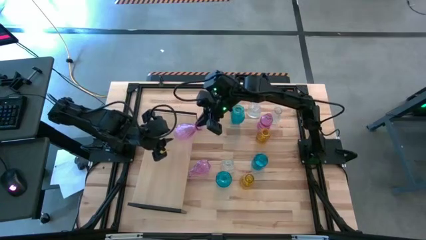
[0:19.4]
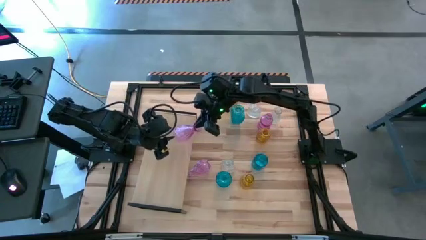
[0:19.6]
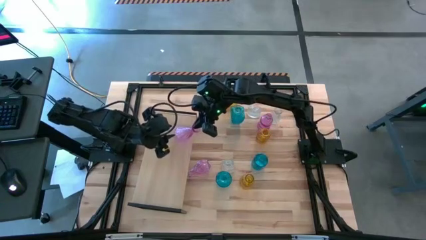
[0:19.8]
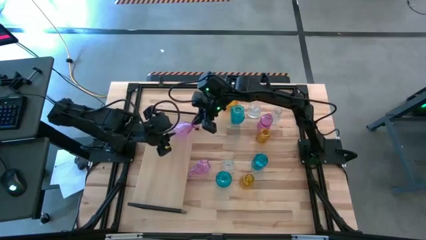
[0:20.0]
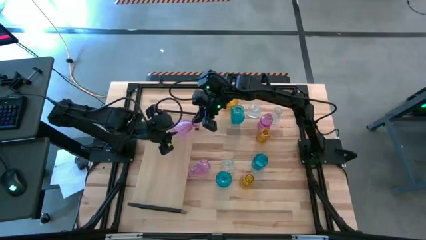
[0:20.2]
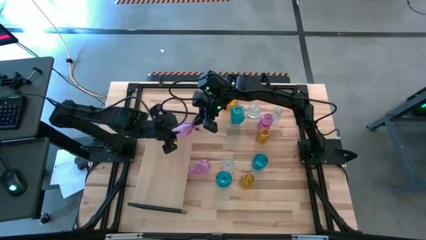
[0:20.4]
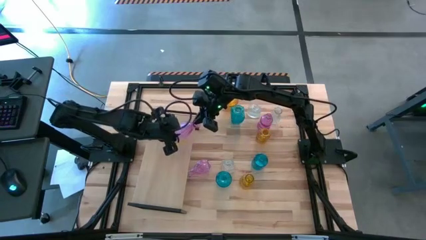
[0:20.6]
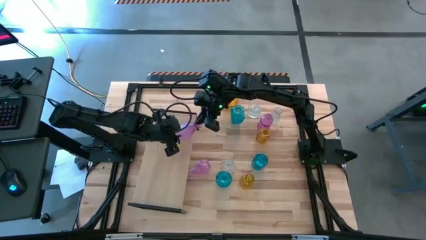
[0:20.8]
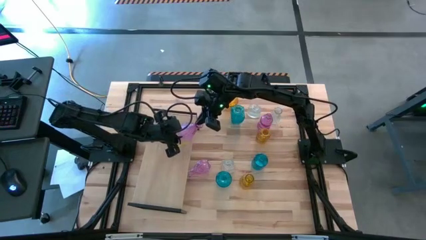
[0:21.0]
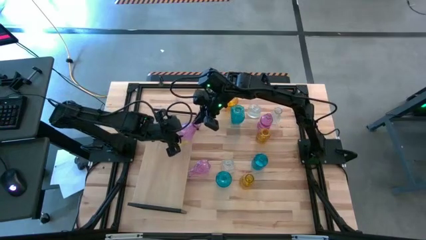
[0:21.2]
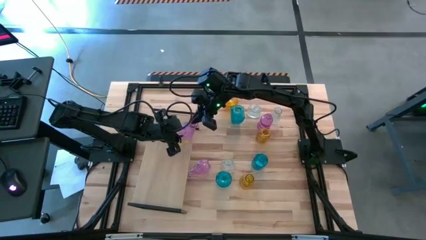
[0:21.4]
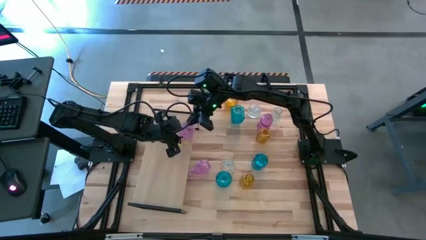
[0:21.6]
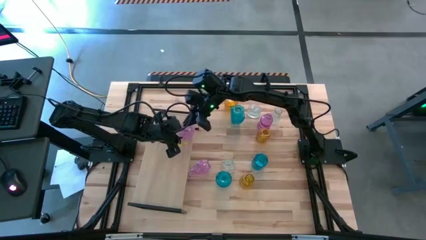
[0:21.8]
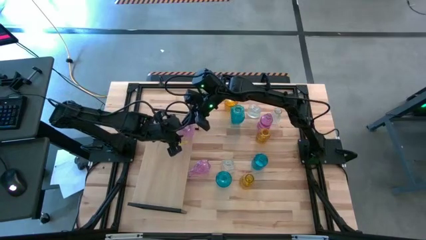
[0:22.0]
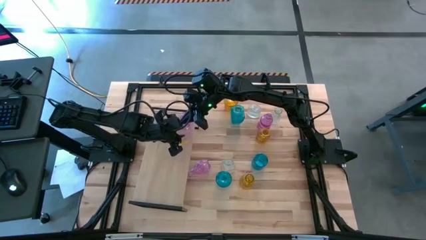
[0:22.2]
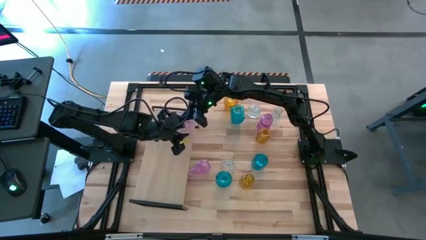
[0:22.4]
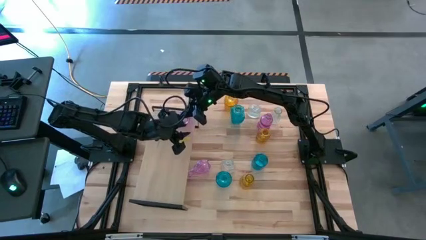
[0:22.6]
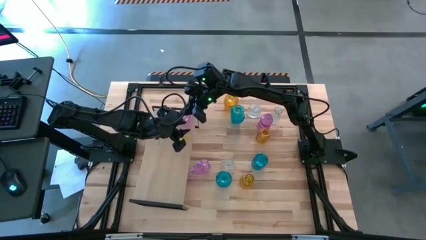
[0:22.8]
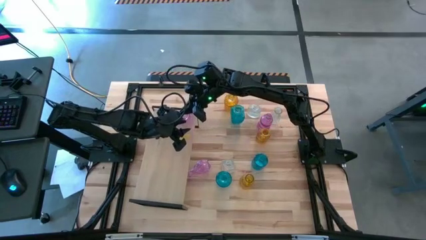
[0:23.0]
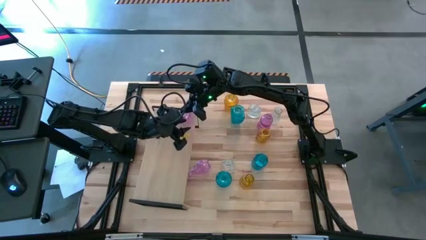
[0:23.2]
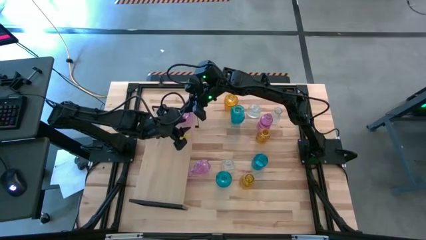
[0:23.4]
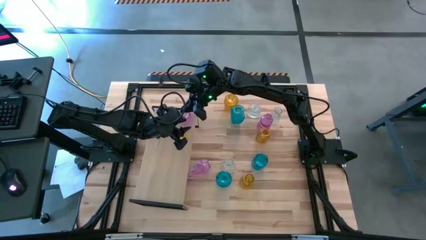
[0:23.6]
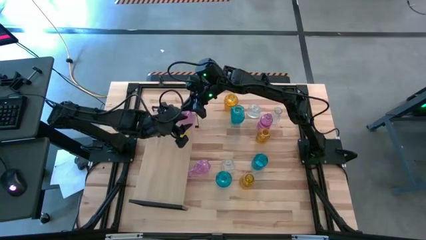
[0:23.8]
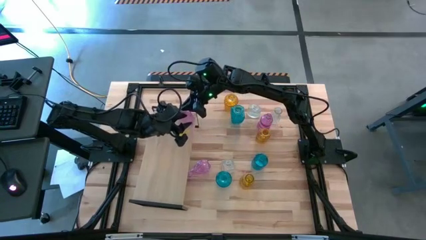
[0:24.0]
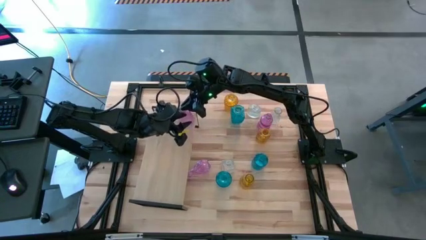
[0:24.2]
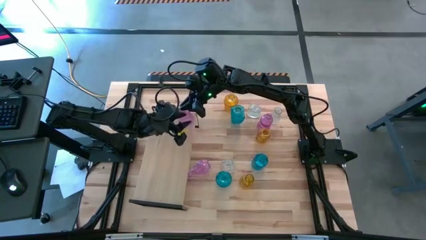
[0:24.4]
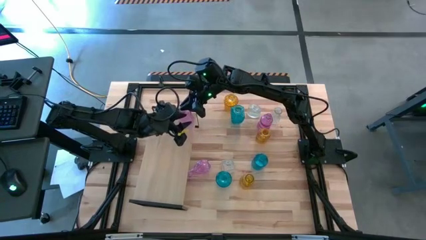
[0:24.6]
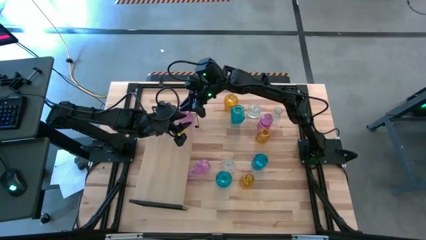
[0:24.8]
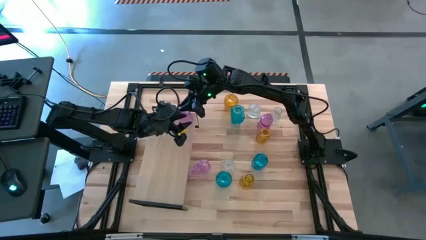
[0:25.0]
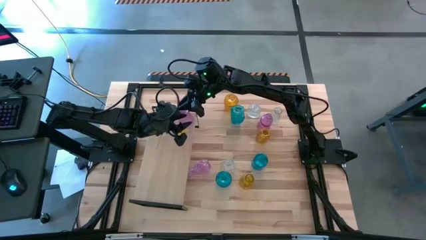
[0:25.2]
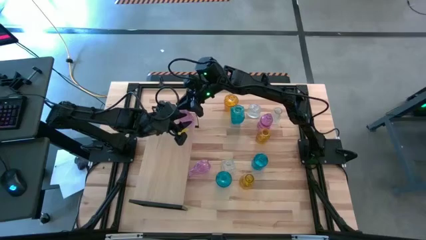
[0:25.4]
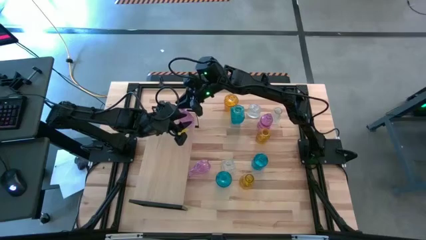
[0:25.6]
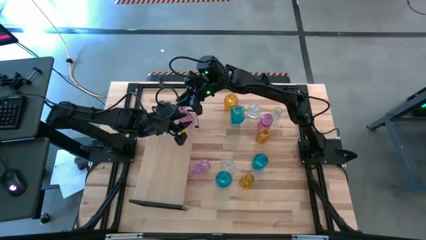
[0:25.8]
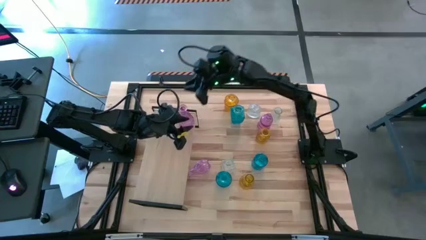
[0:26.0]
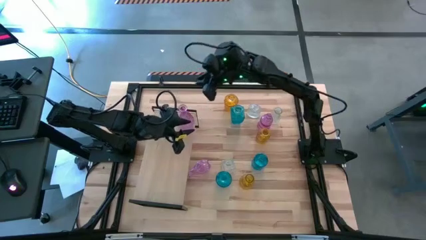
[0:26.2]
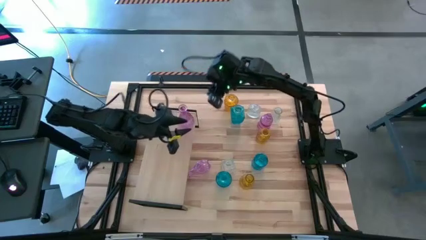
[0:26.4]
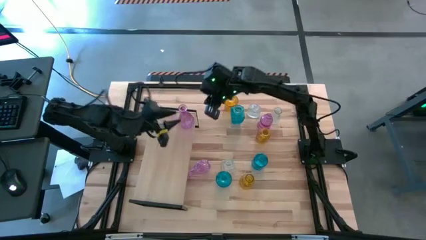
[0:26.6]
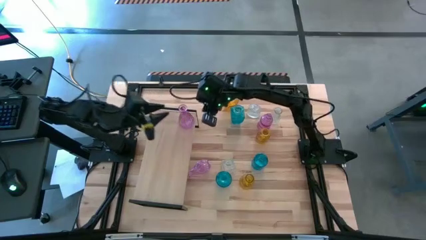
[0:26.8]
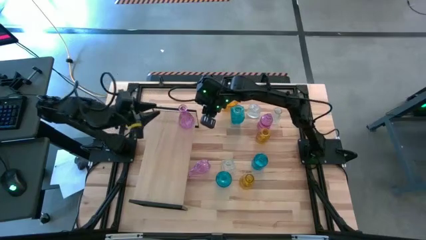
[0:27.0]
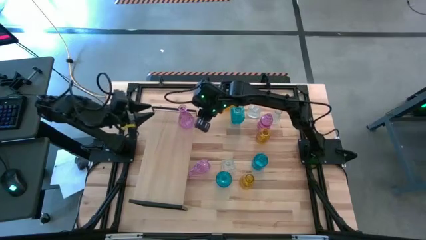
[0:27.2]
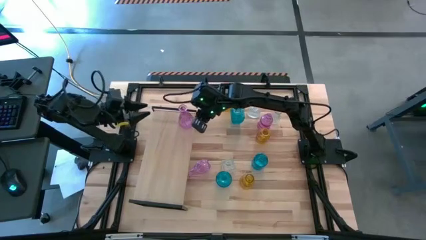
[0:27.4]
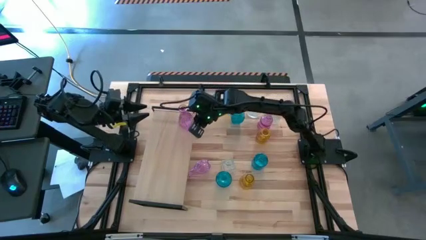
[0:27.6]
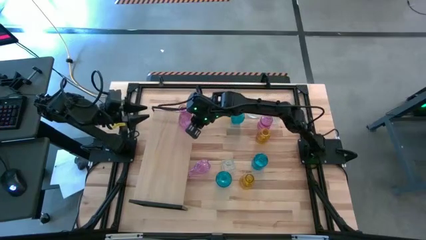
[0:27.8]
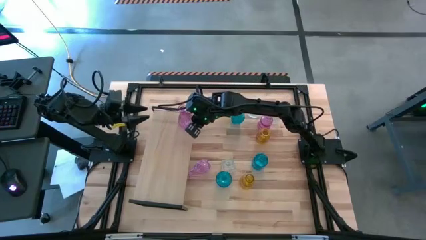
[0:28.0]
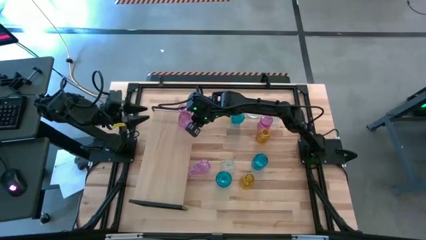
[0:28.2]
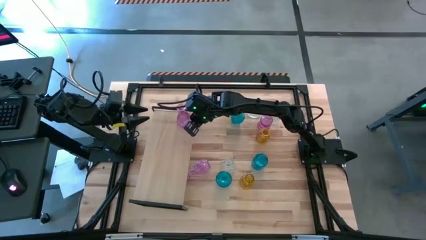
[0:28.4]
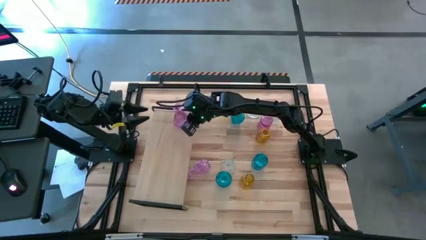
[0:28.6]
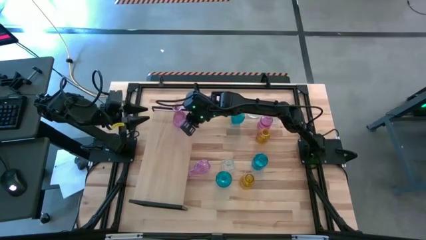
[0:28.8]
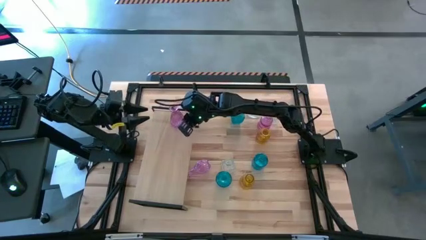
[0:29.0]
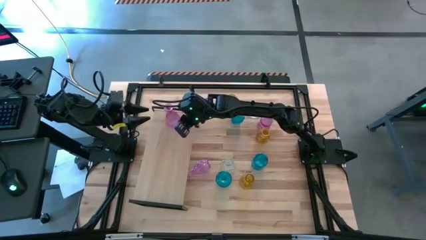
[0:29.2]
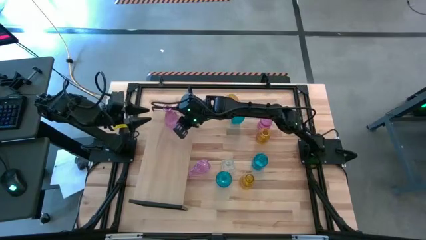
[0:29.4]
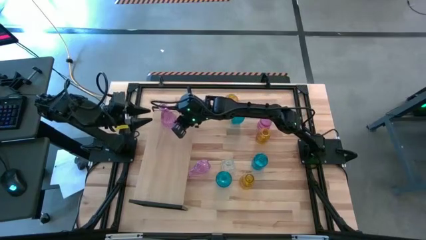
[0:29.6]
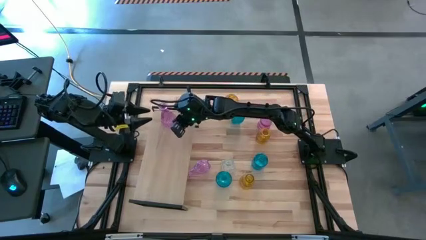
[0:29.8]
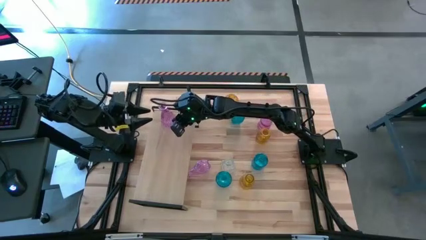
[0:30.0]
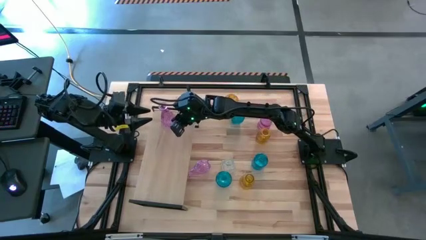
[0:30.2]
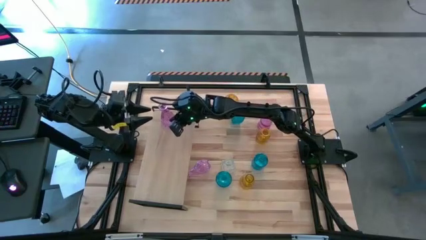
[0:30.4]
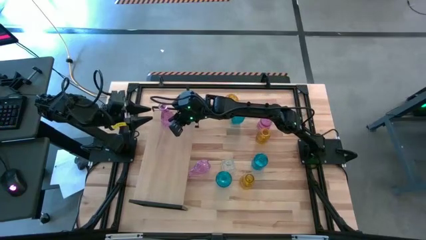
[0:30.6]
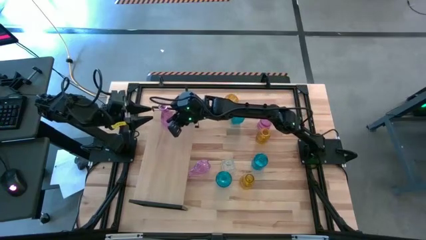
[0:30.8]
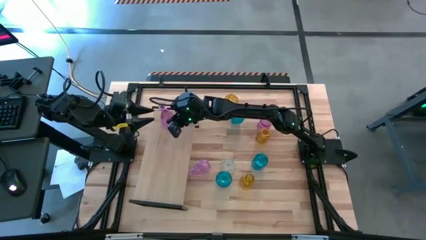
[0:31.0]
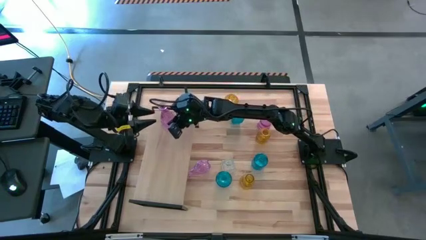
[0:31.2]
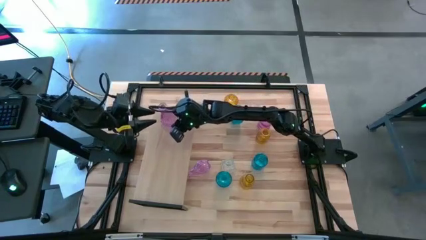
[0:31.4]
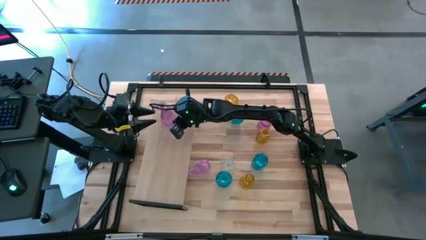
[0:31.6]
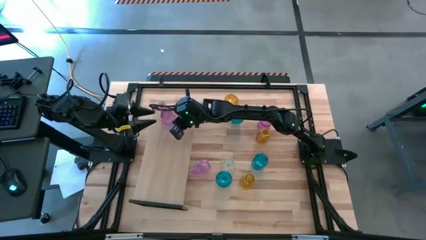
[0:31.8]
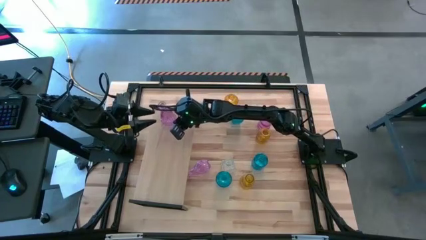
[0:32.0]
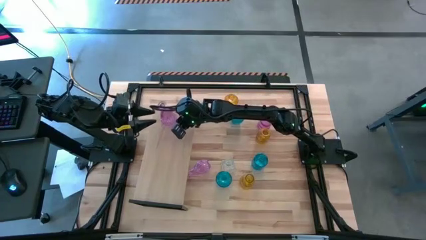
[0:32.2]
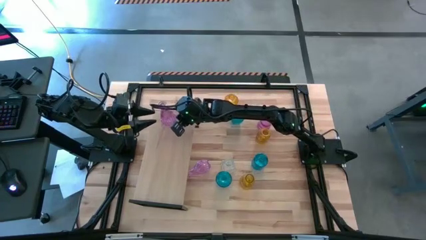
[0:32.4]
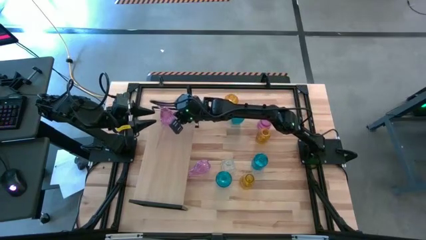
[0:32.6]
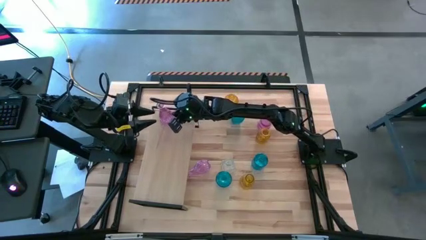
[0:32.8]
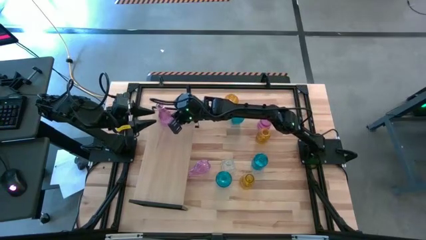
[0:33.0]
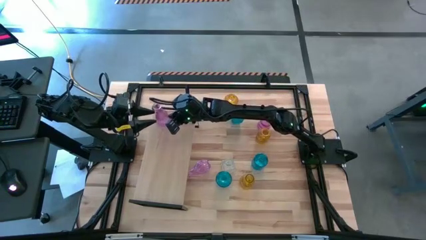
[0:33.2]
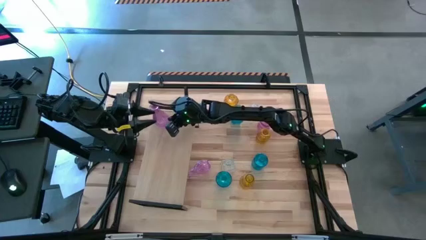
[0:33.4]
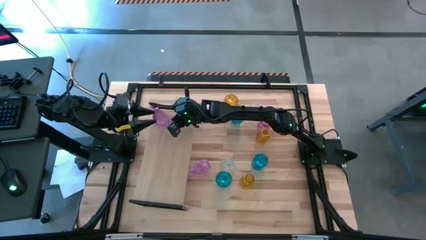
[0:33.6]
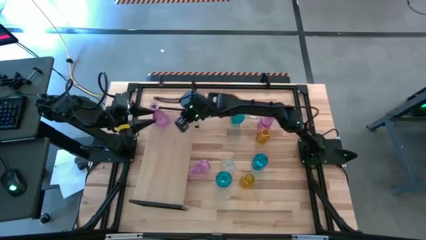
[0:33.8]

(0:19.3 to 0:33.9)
Task: sort vases onto shelf
Put the center violet flower vase on the shelf
